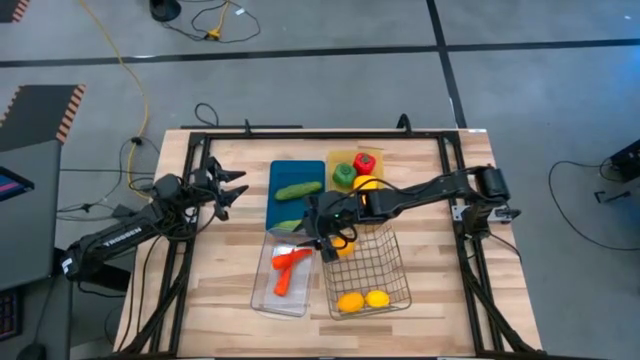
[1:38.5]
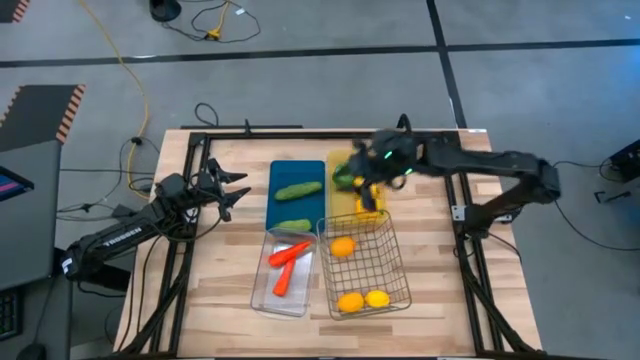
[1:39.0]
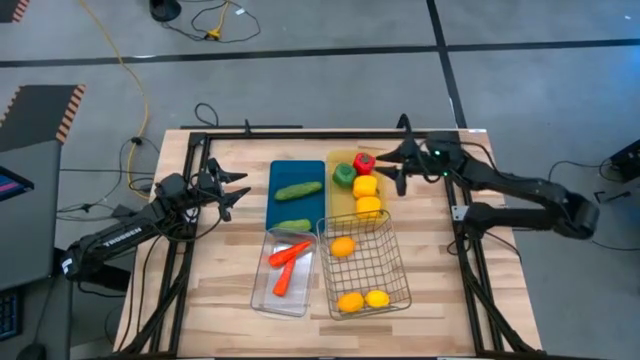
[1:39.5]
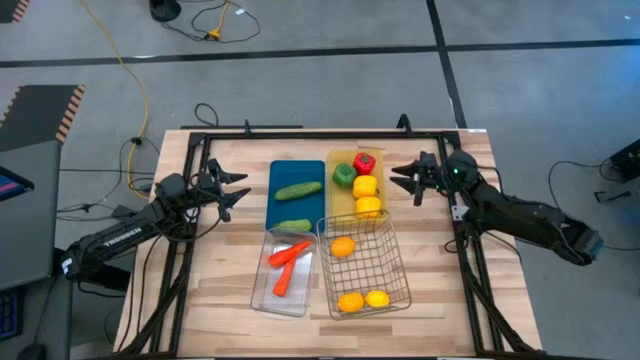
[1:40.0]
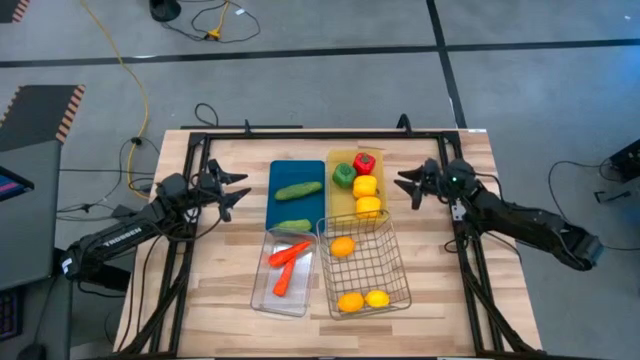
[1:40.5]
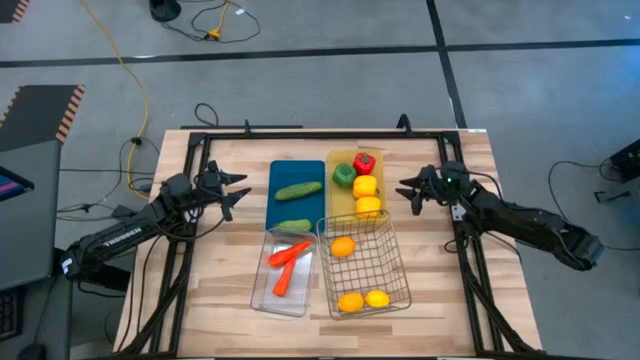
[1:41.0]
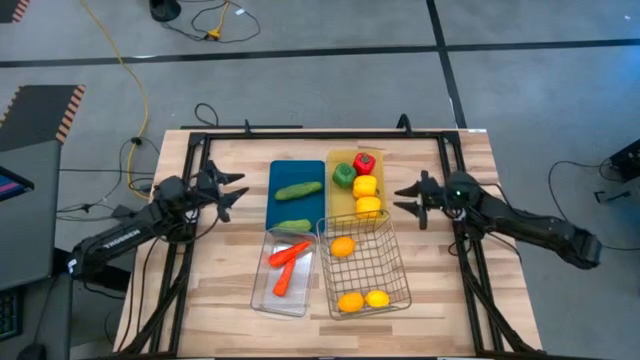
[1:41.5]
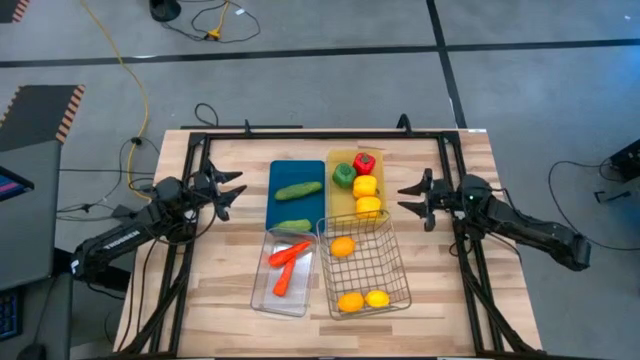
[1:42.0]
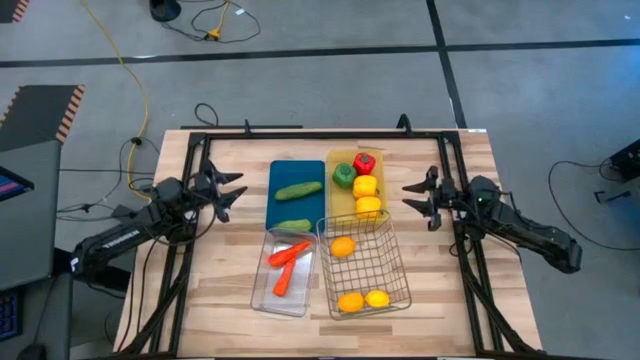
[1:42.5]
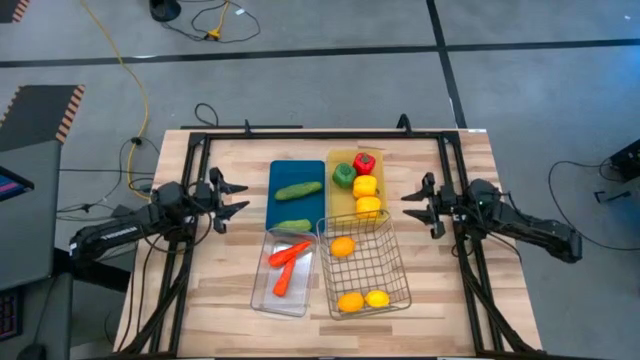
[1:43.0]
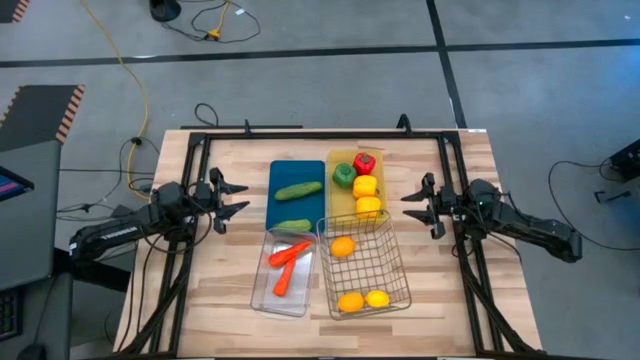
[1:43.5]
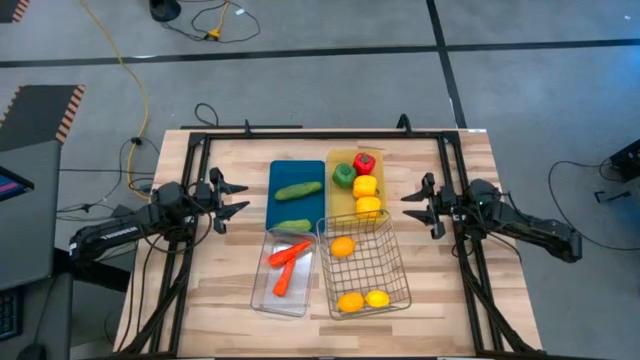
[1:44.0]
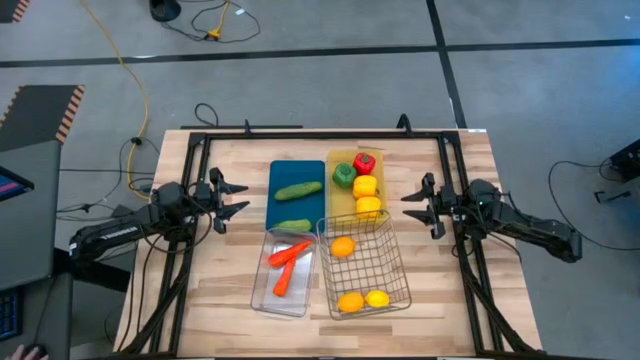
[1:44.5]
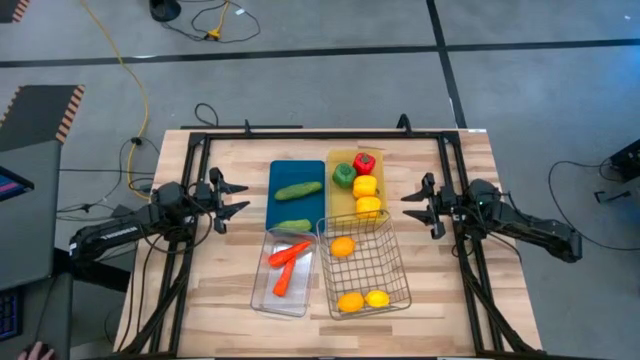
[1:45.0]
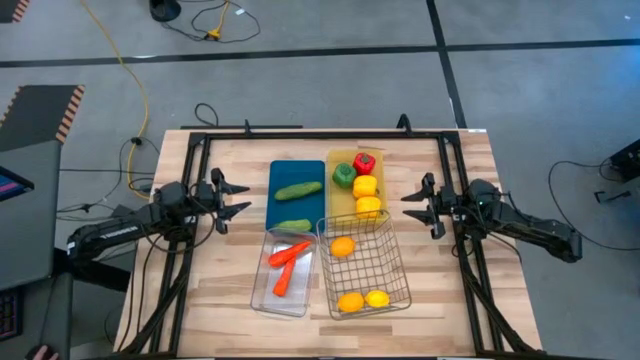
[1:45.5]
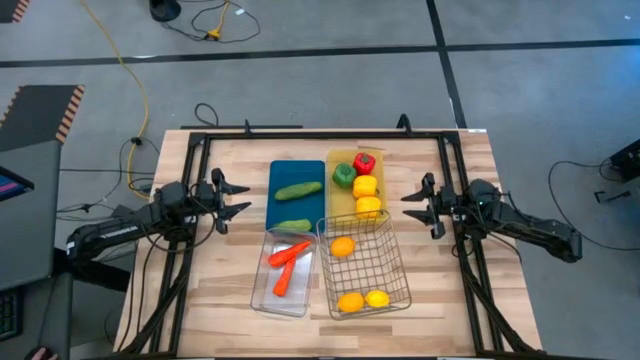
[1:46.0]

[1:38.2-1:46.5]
Task: Sort produce into baskets
Return to Home Position

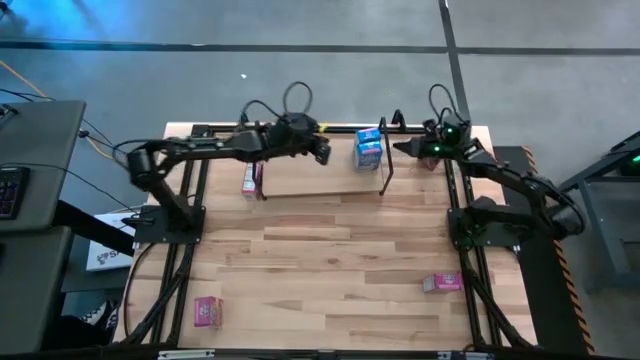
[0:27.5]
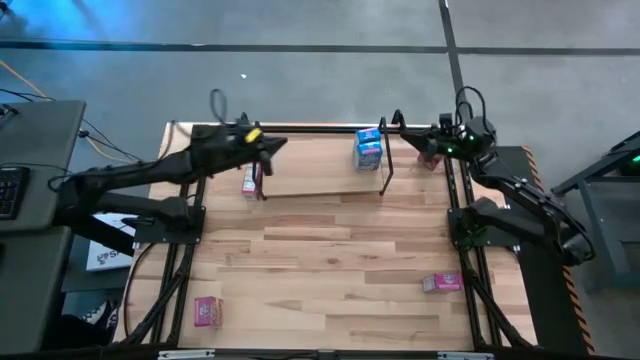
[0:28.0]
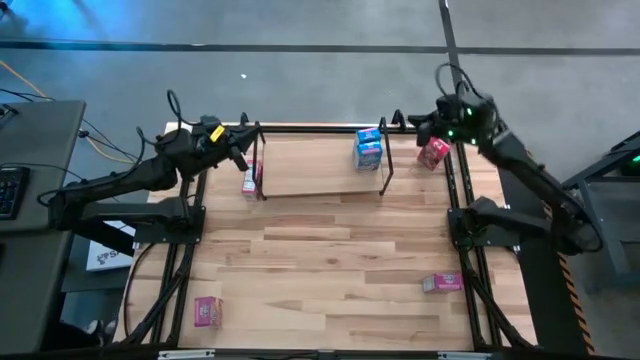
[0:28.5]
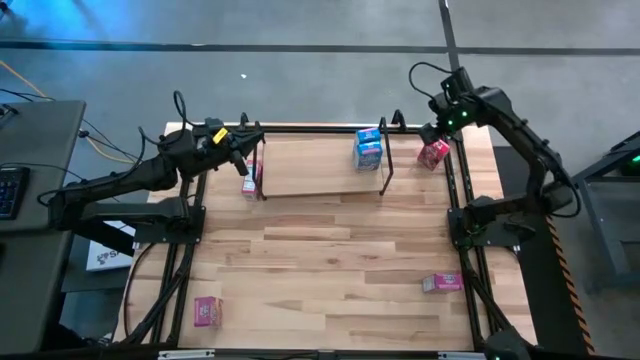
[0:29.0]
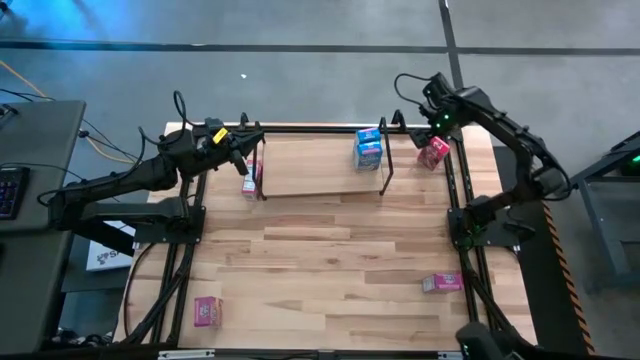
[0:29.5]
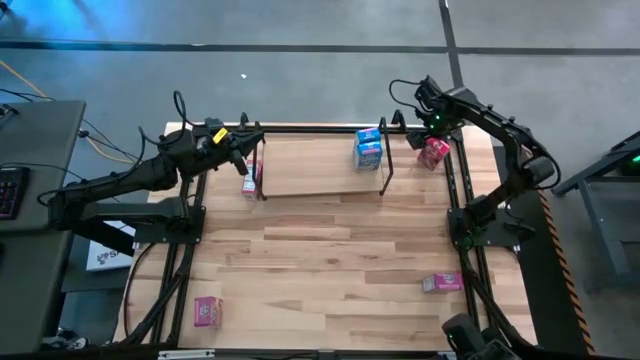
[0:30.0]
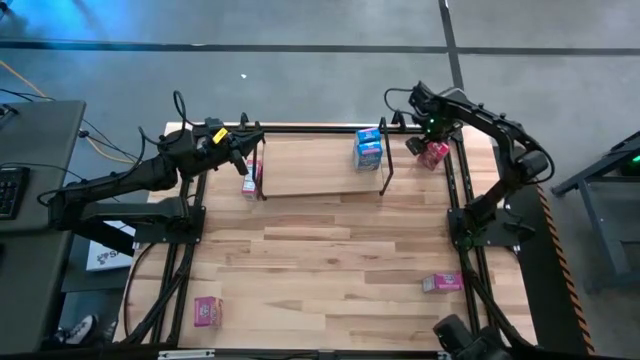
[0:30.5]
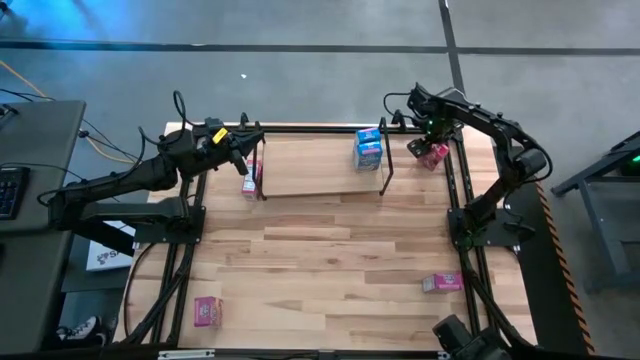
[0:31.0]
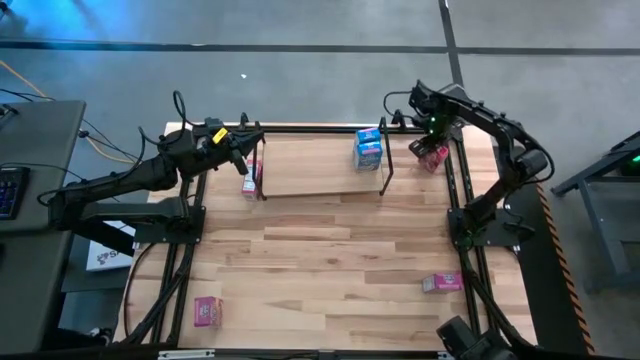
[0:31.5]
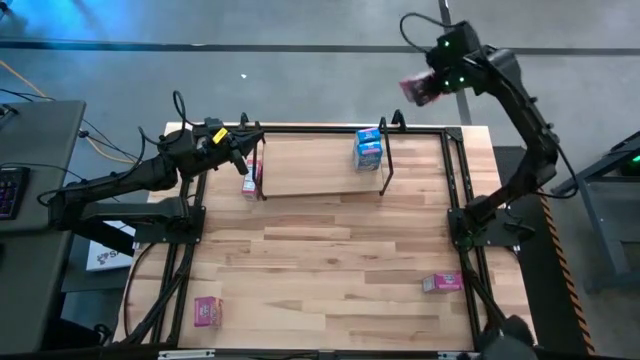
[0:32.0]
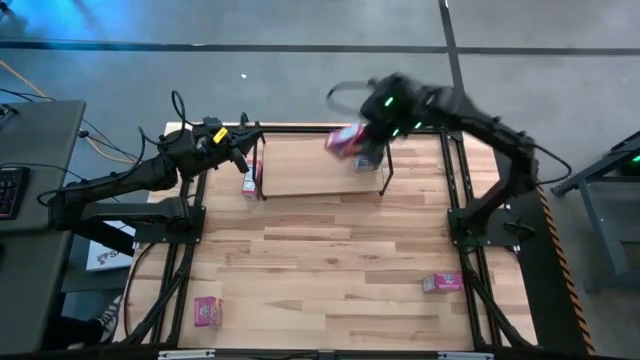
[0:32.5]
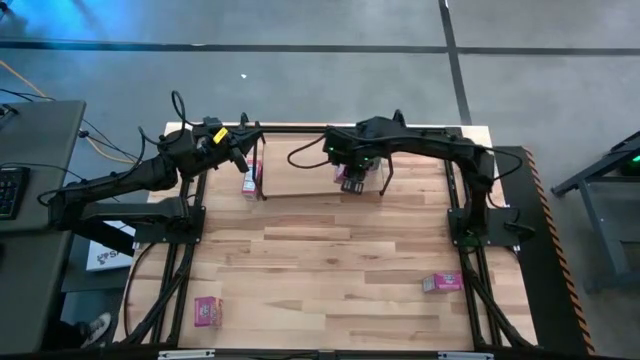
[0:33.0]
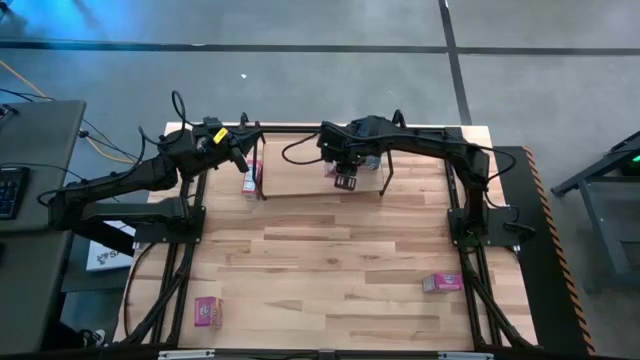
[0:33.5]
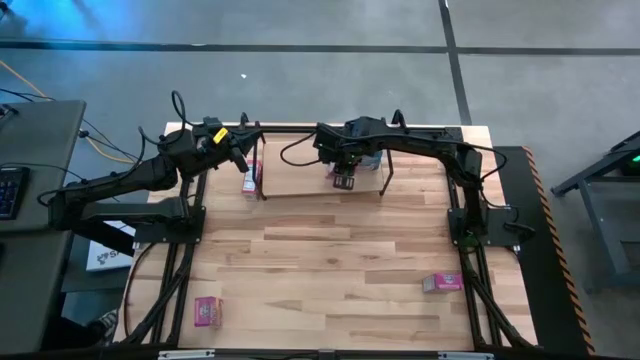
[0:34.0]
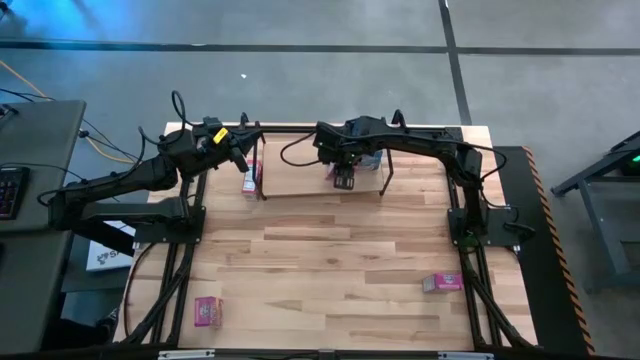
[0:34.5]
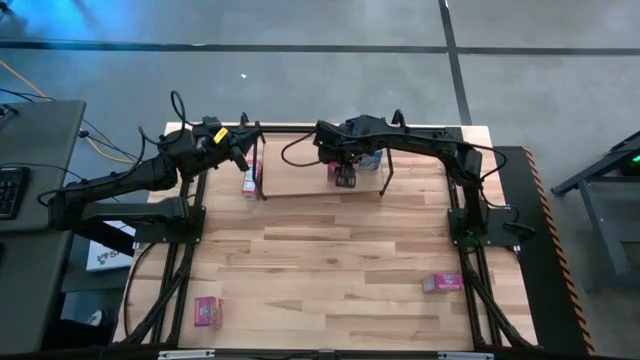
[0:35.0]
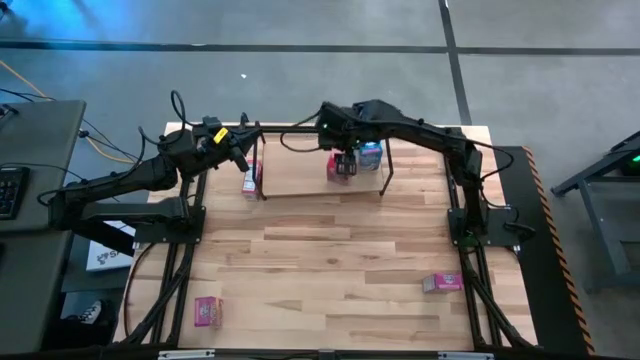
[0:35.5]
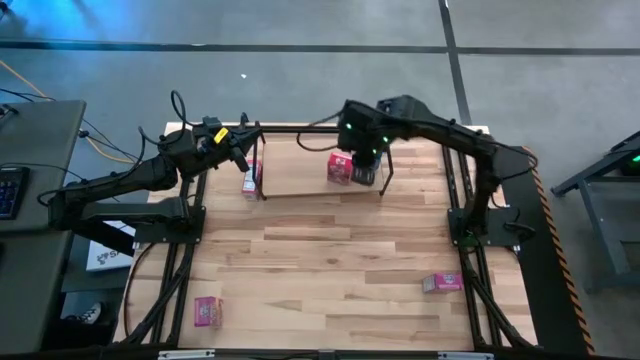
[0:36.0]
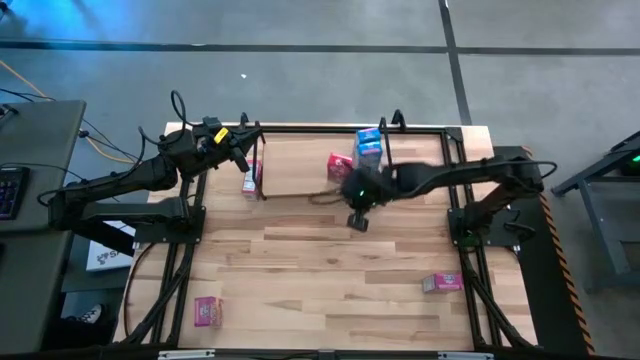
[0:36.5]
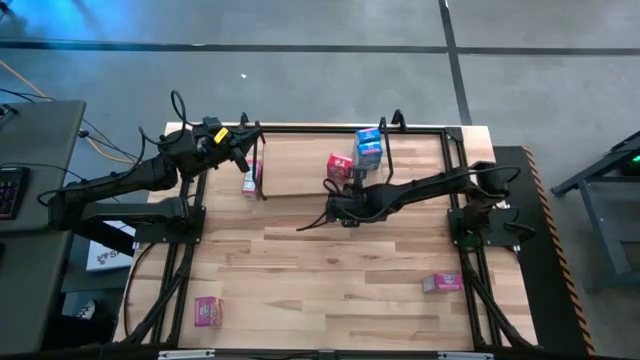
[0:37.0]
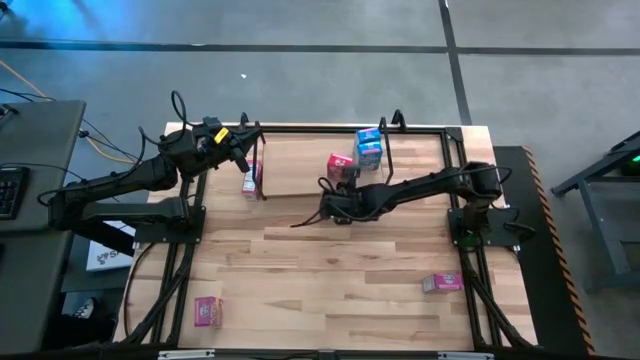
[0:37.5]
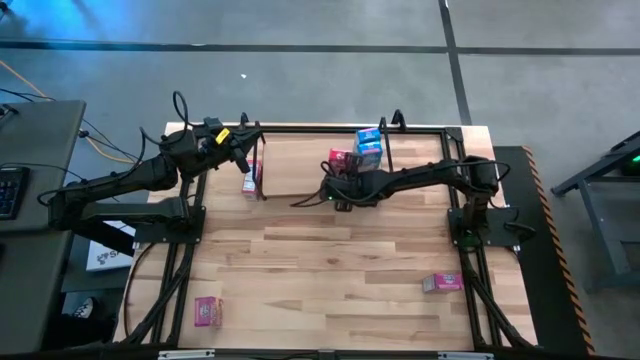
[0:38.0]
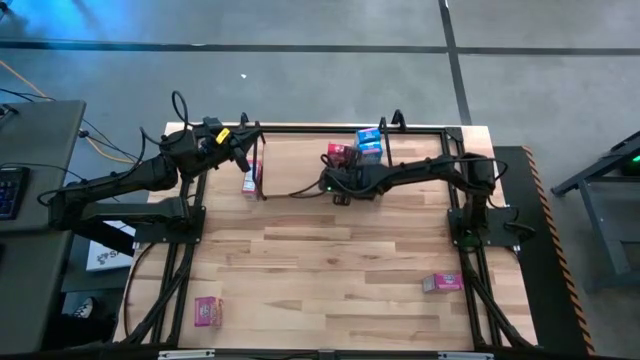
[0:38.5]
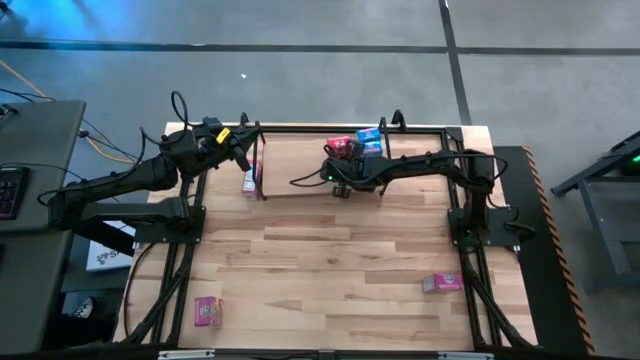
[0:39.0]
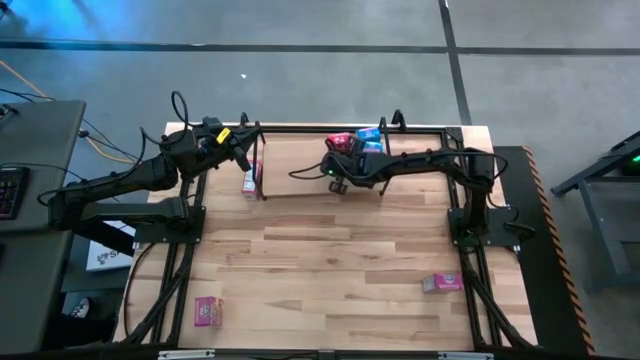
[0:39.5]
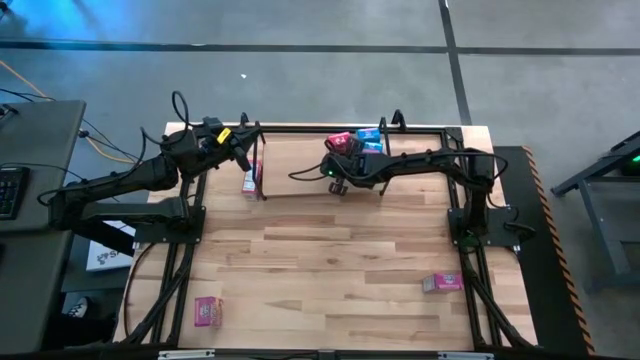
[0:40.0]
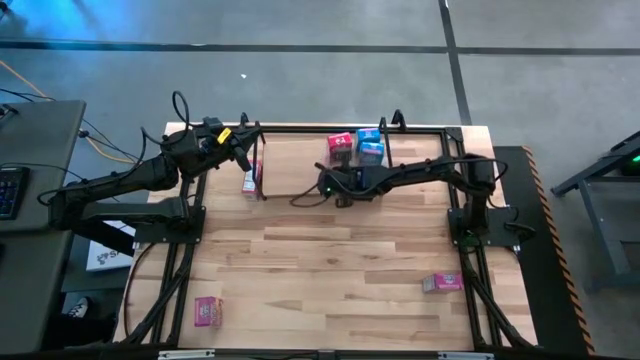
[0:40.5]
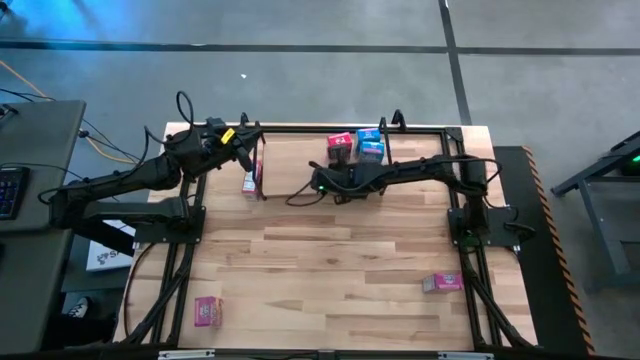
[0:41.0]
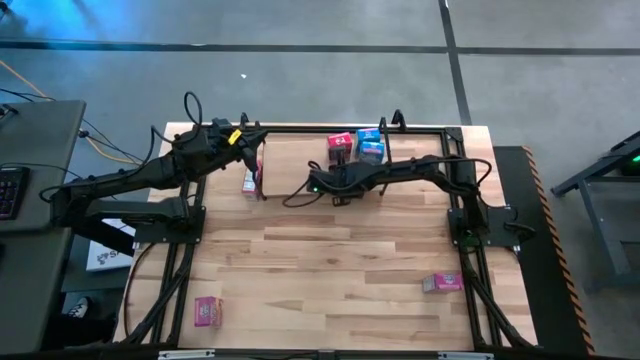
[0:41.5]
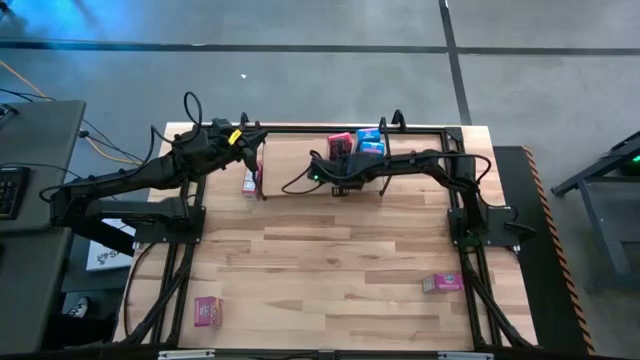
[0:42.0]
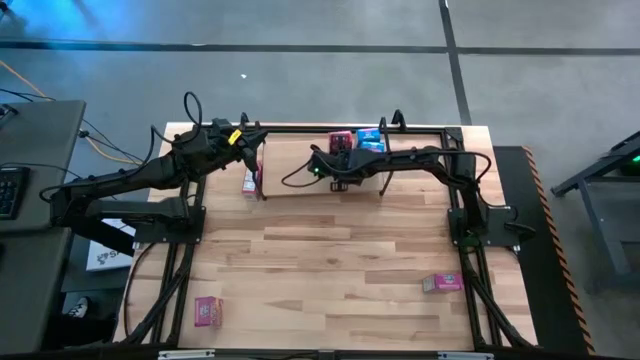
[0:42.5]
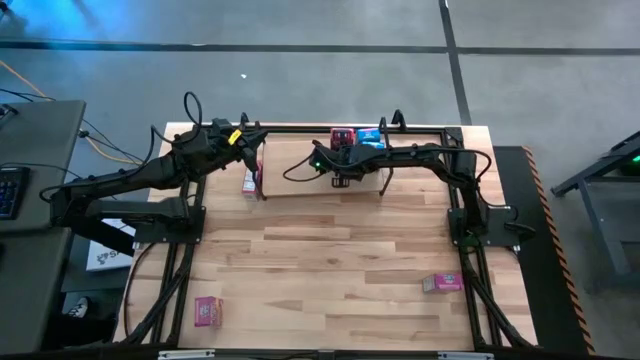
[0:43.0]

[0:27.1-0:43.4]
Task: Stack cereal on shelf
Put the top red cereal box on the shelf
